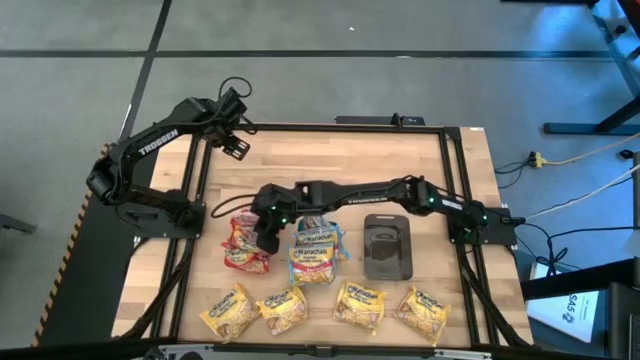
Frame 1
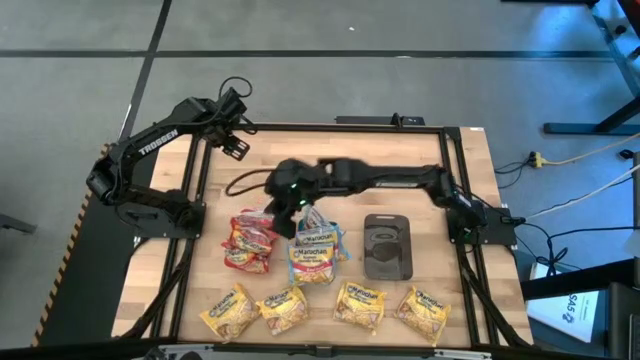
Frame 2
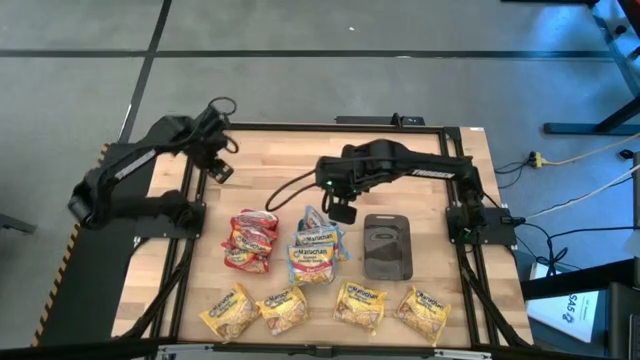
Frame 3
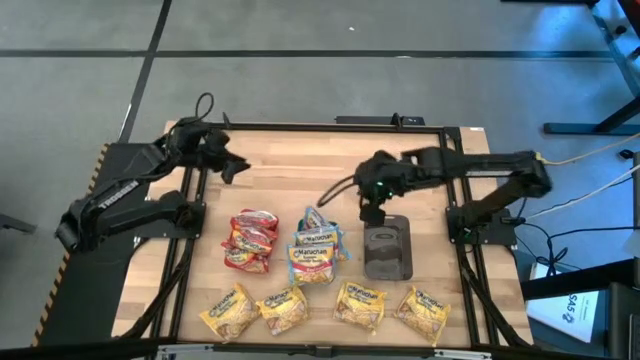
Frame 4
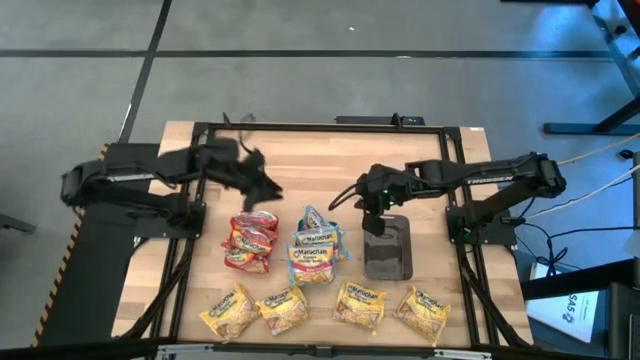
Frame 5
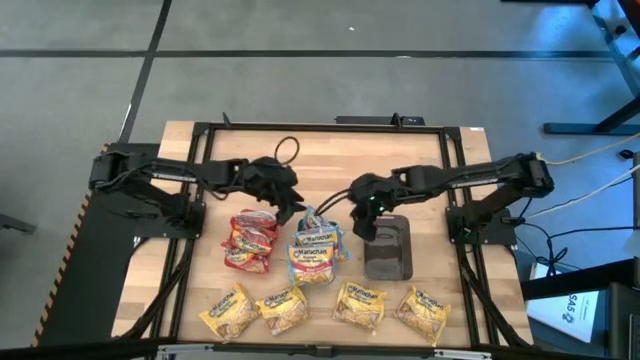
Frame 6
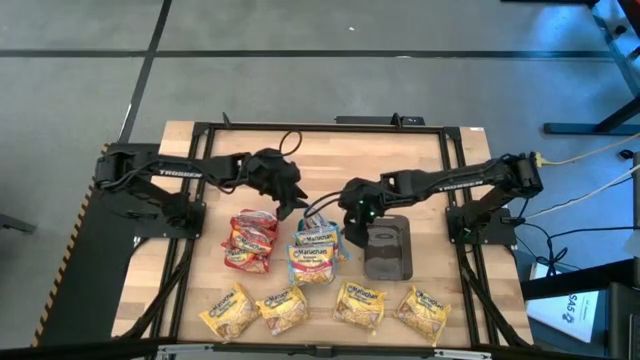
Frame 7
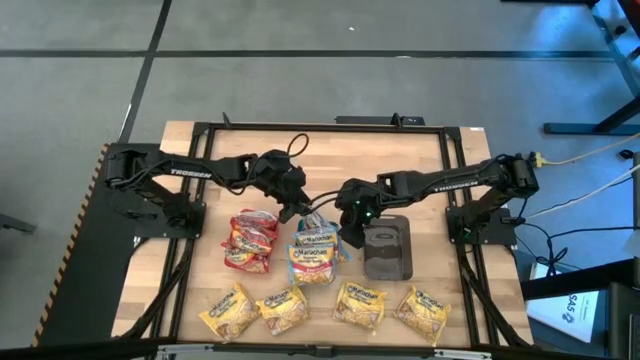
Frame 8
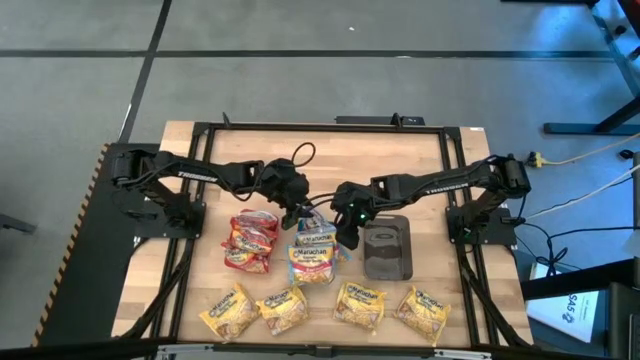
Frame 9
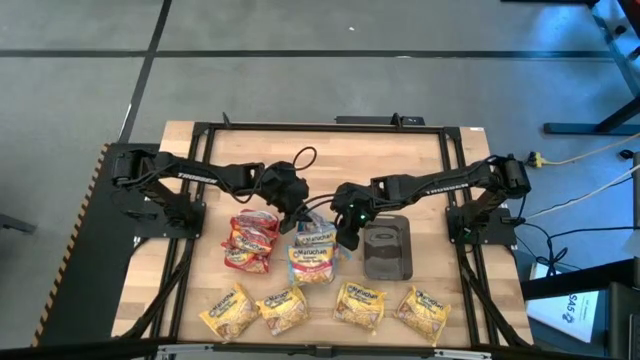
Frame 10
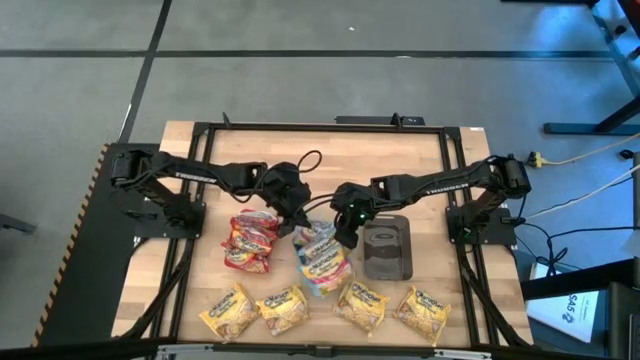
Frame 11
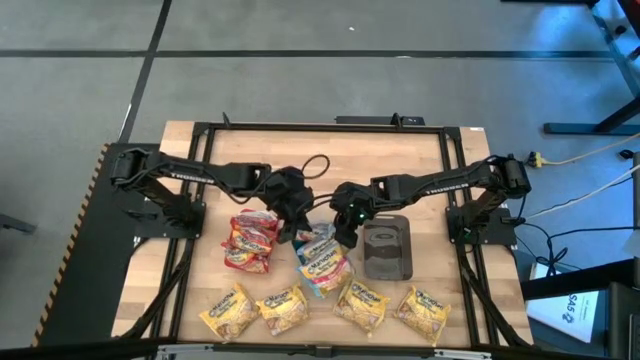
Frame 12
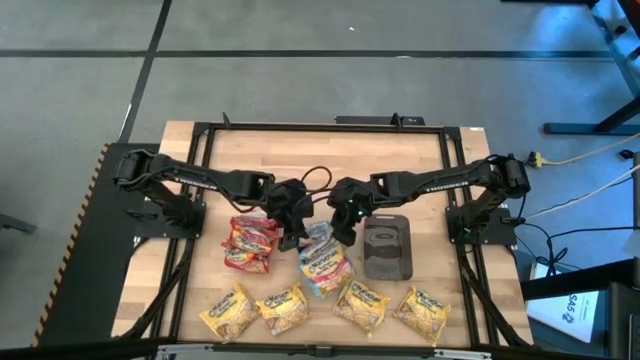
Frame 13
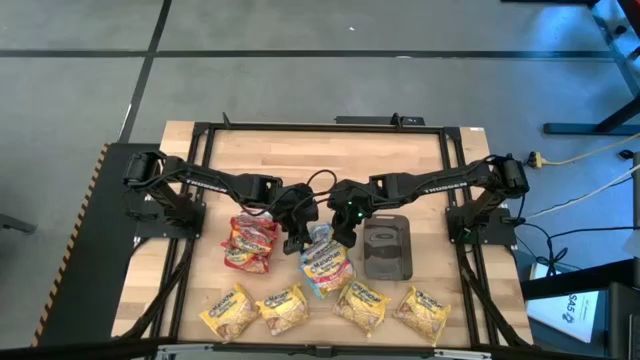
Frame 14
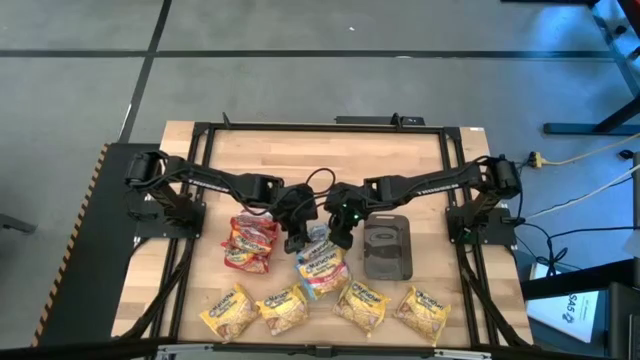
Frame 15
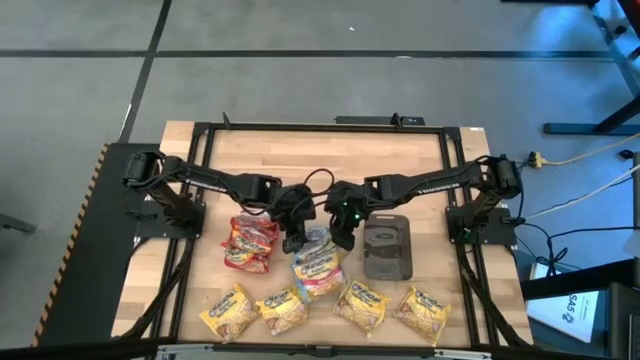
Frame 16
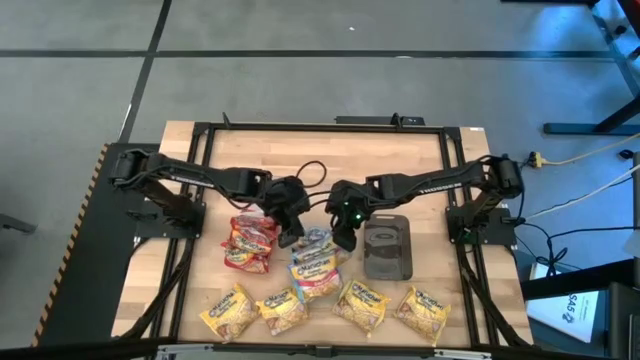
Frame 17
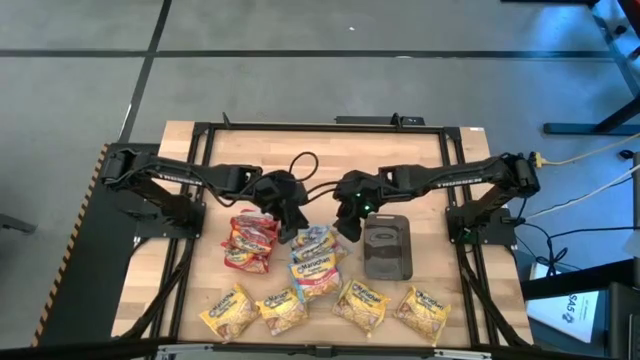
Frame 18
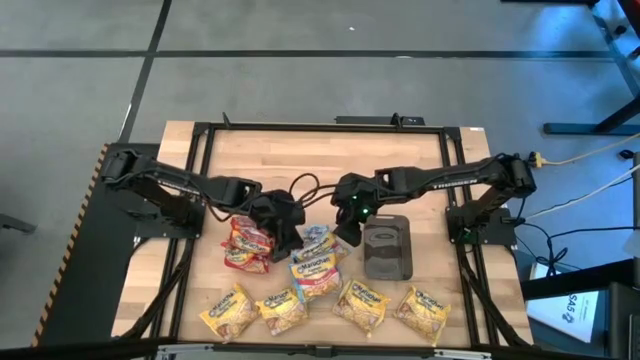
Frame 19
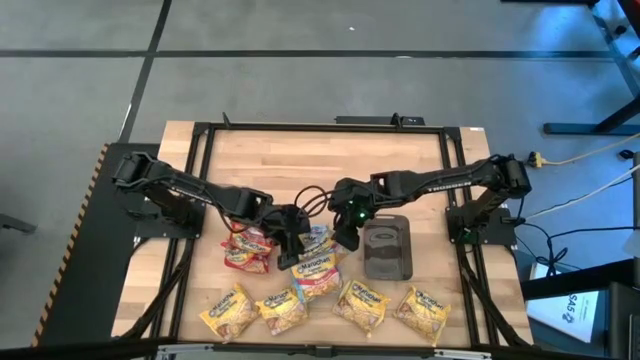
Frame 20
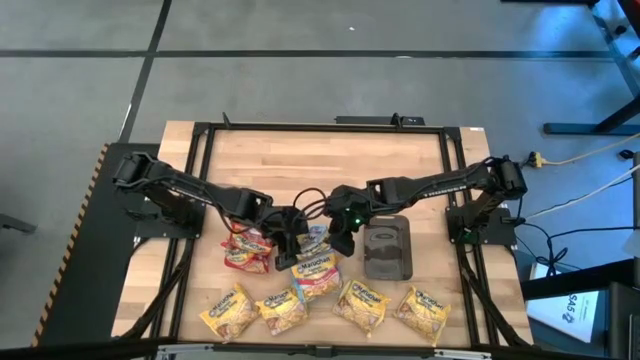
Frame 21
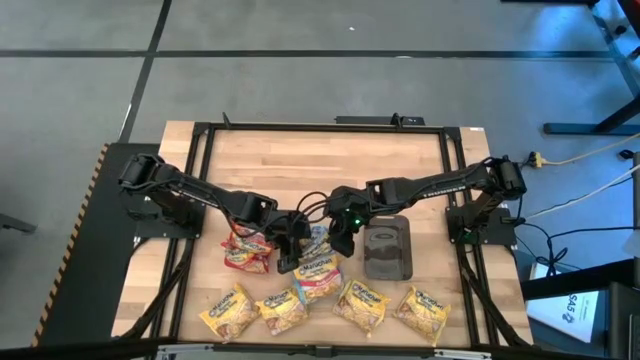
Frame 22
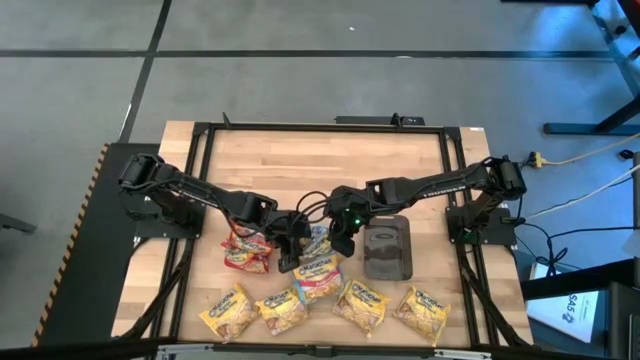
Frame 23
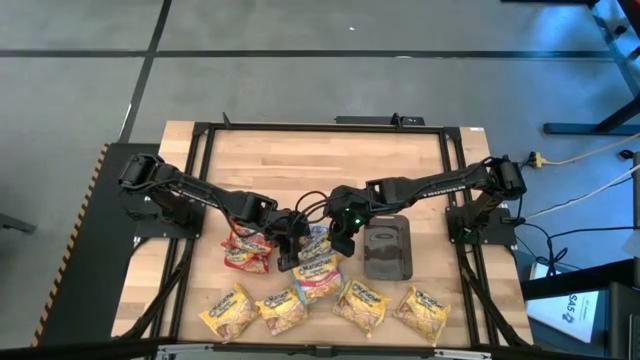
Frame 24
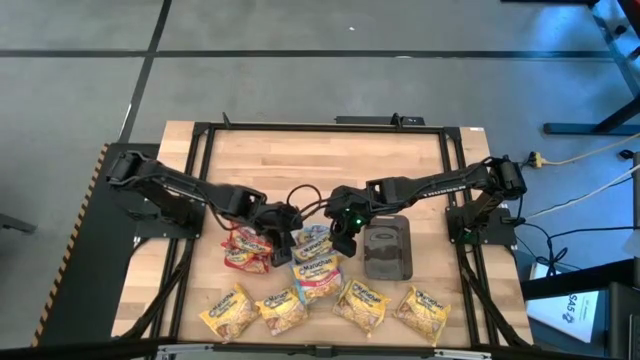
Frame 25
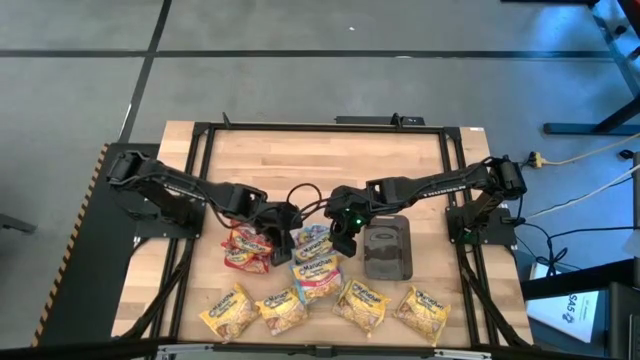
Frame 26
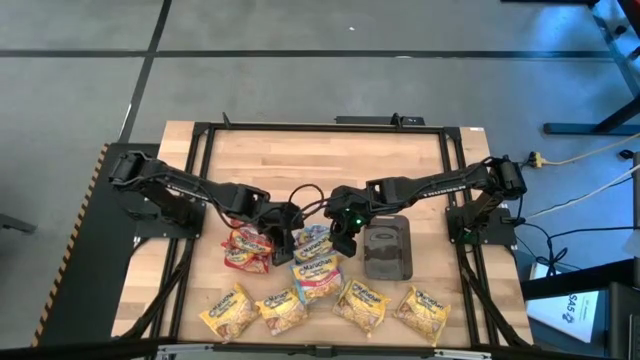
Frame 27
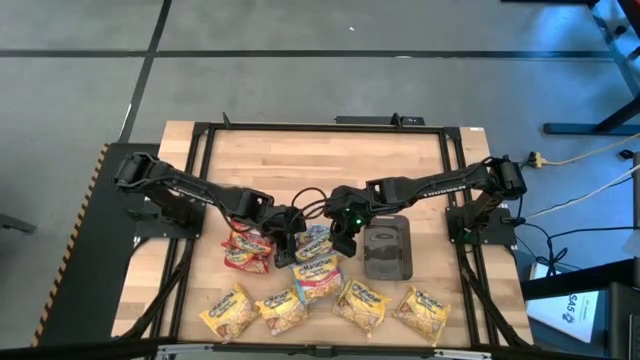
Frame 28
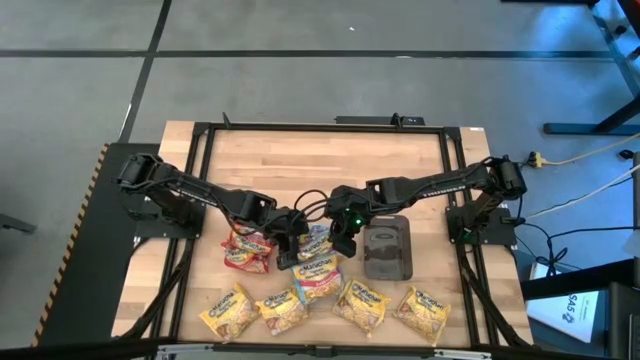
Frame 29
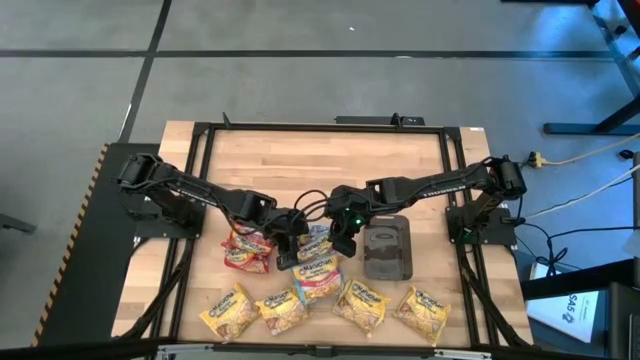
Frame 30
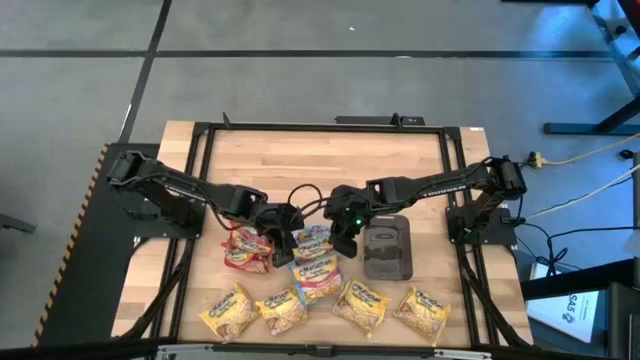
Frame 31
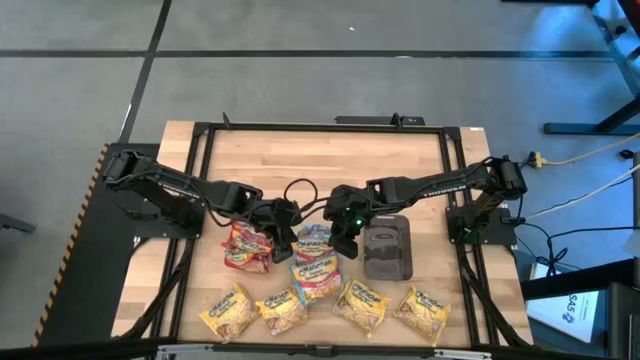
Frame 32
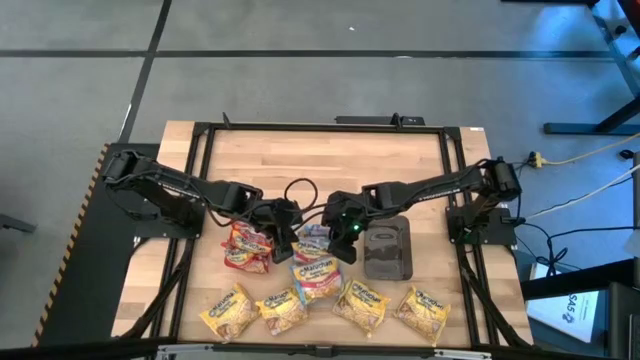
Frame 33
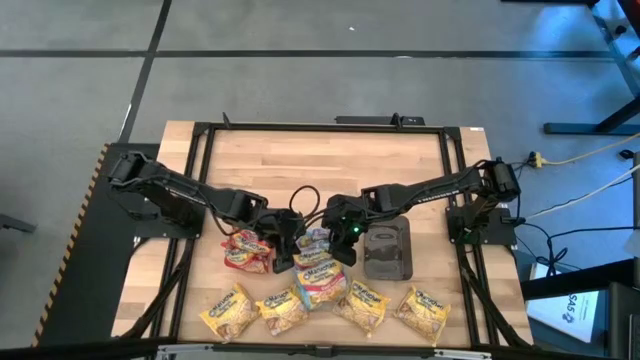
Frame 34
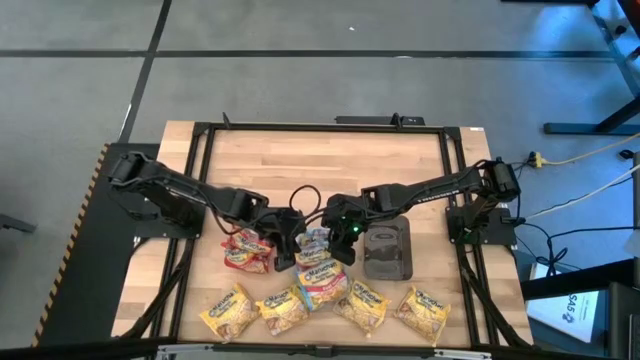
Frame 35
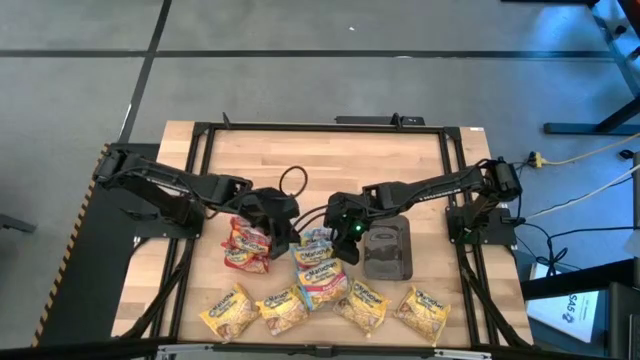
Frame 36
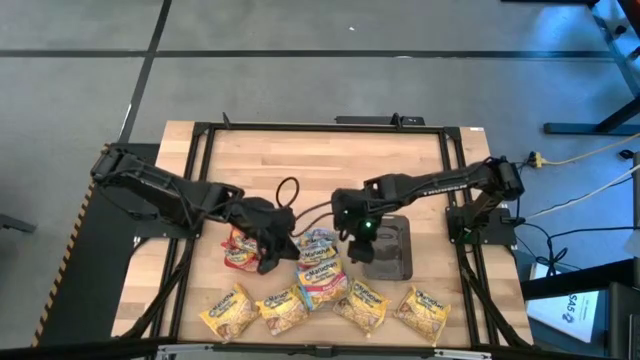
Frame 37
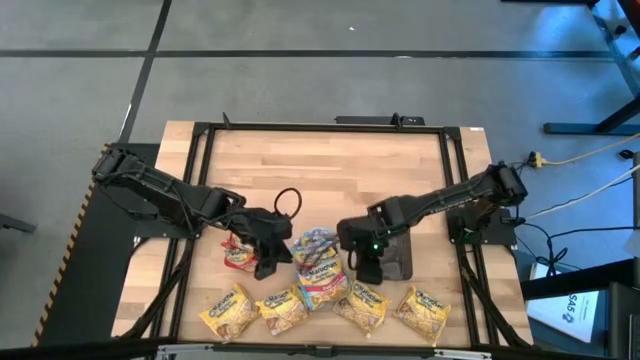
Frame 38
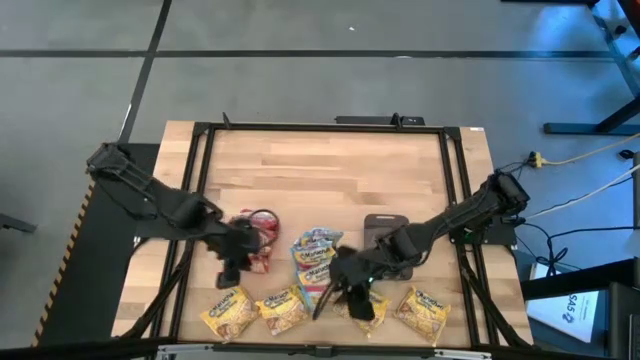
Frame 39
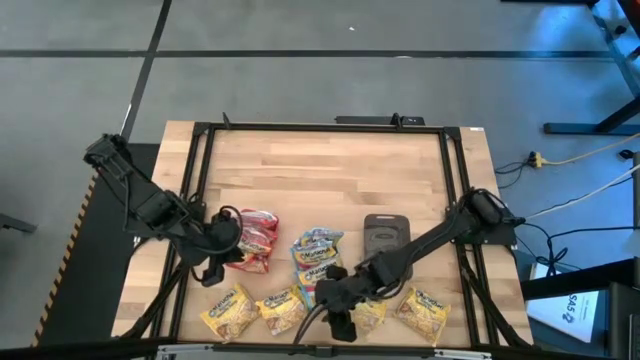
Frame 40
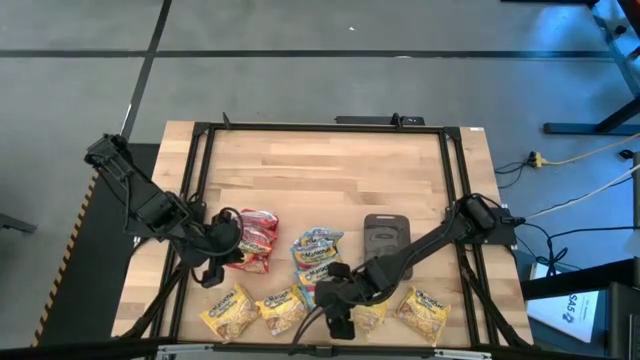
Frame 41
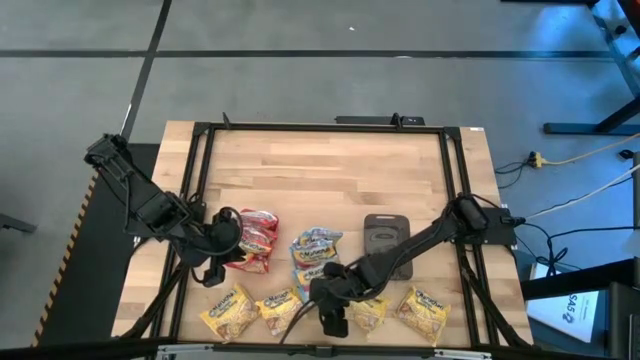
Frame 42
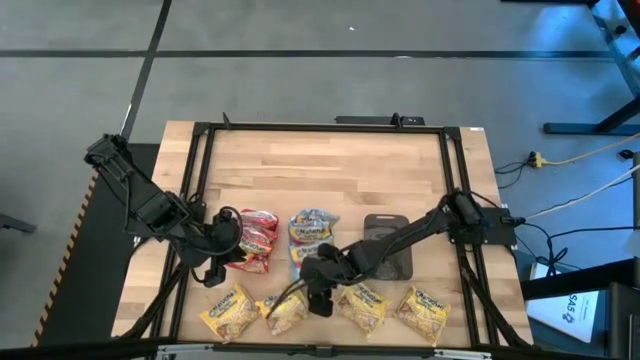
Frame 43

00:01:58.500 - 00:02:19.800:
Task: Sort Maruchan noodles
Adjust the blue noodle packs in the blue bin
